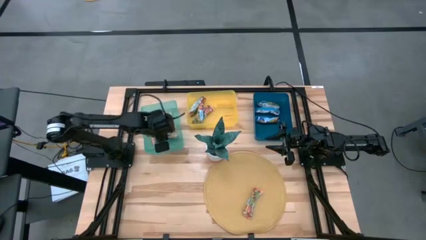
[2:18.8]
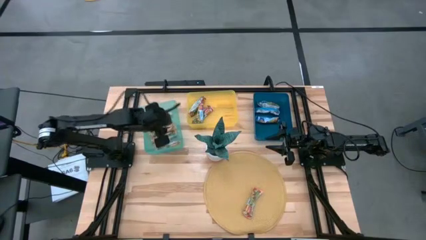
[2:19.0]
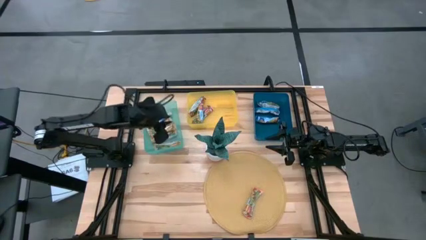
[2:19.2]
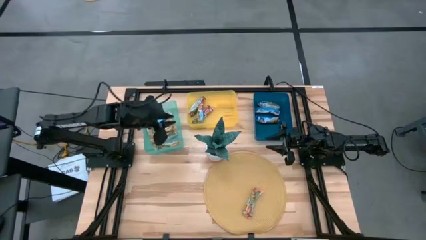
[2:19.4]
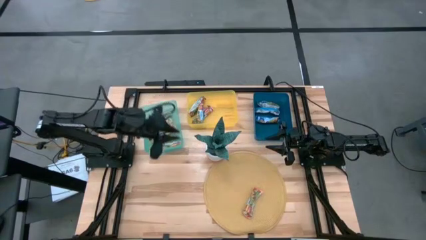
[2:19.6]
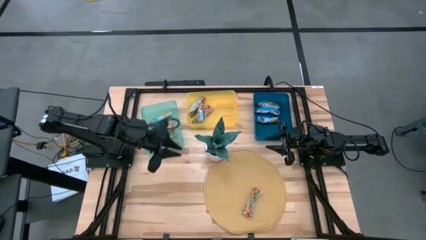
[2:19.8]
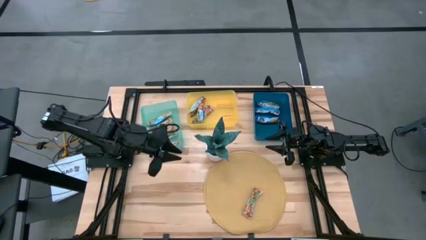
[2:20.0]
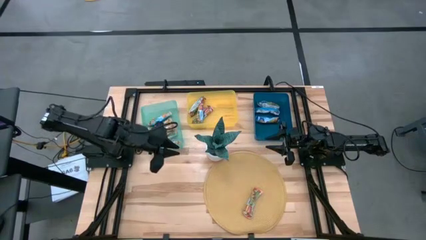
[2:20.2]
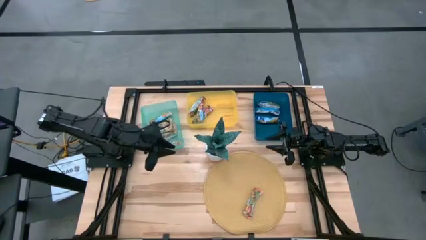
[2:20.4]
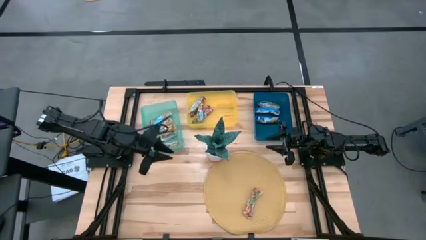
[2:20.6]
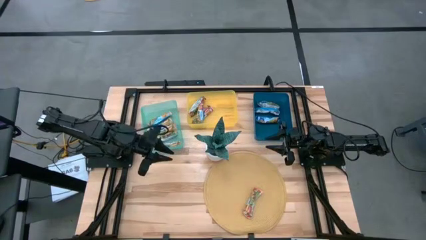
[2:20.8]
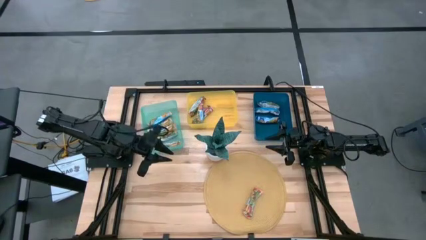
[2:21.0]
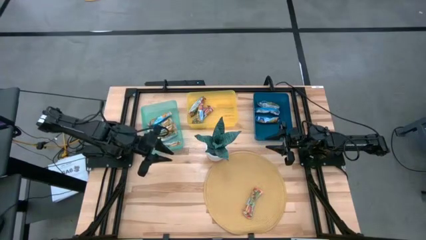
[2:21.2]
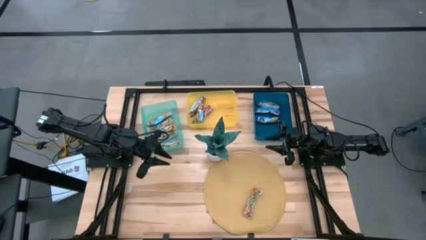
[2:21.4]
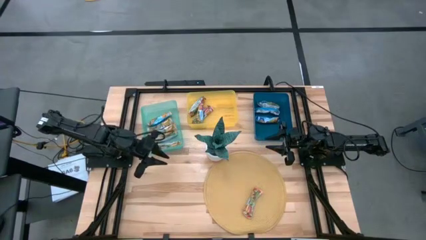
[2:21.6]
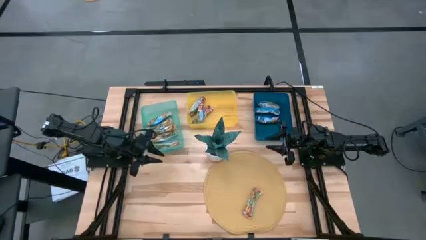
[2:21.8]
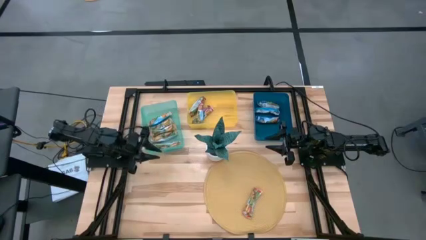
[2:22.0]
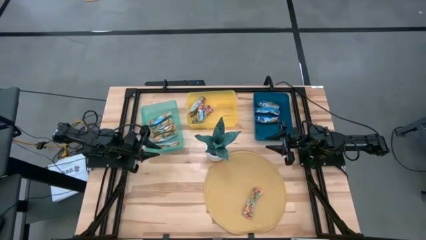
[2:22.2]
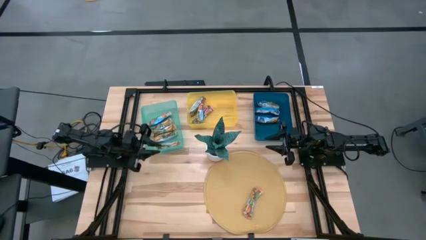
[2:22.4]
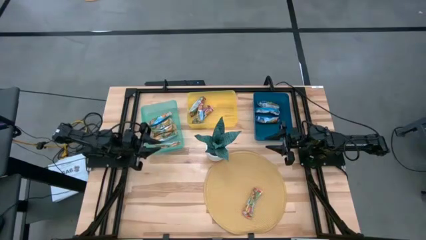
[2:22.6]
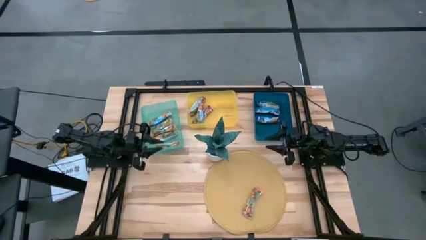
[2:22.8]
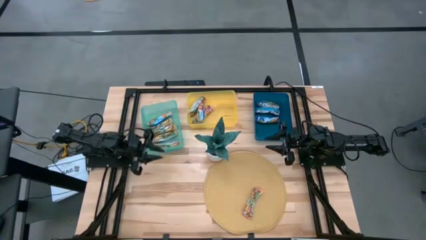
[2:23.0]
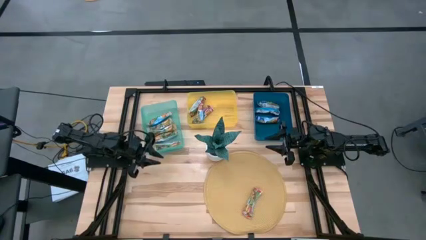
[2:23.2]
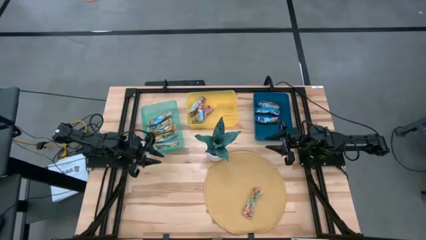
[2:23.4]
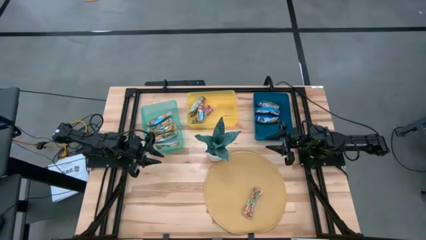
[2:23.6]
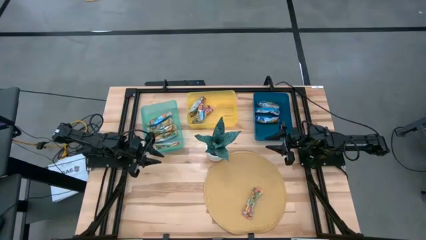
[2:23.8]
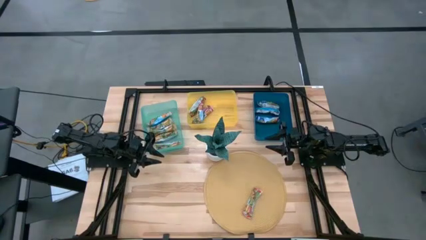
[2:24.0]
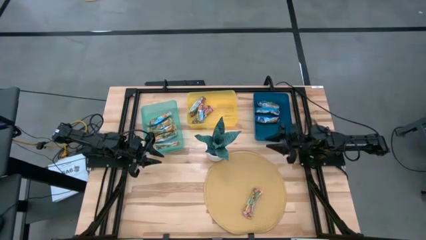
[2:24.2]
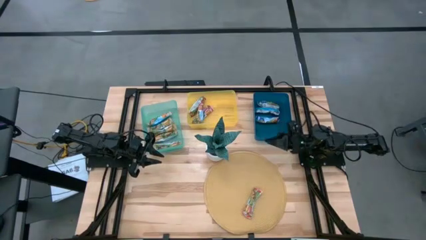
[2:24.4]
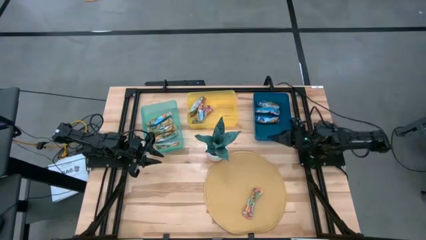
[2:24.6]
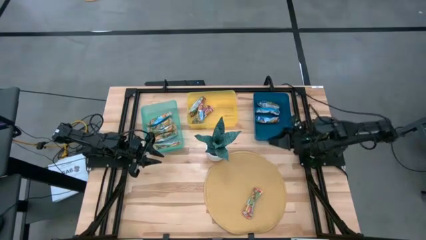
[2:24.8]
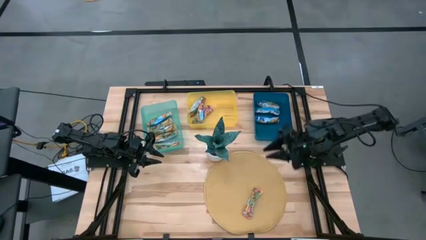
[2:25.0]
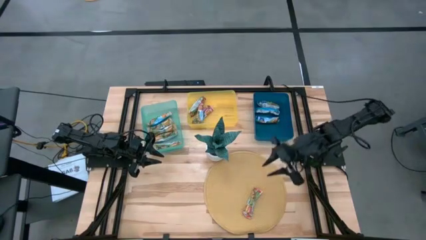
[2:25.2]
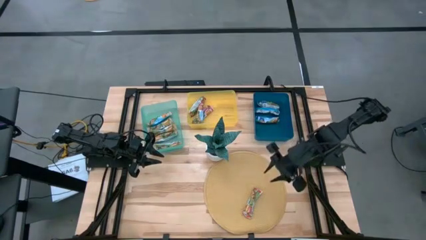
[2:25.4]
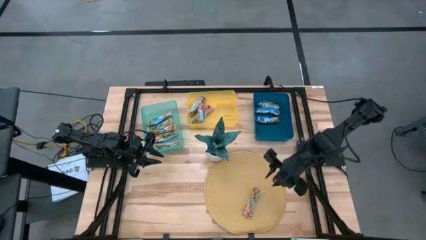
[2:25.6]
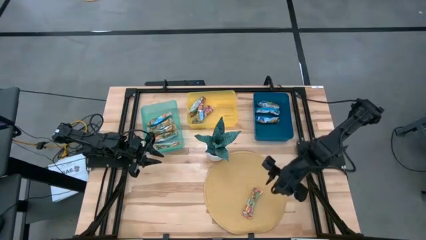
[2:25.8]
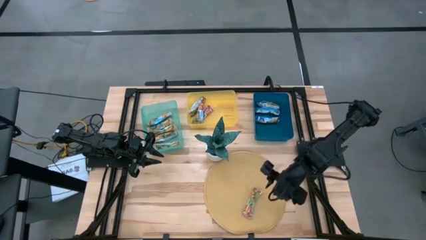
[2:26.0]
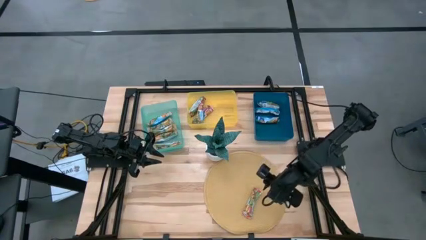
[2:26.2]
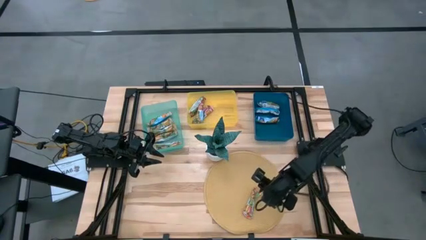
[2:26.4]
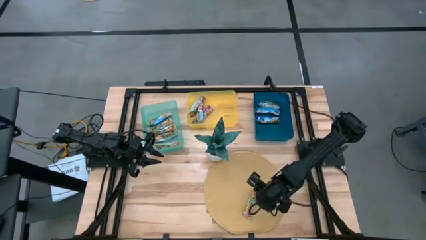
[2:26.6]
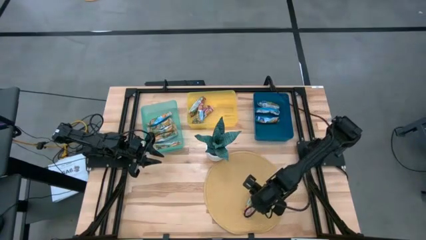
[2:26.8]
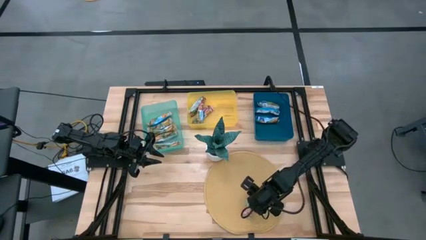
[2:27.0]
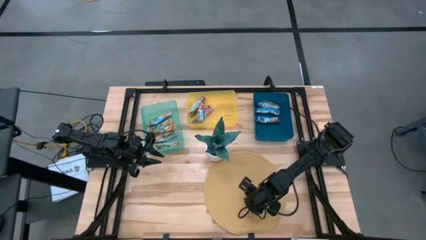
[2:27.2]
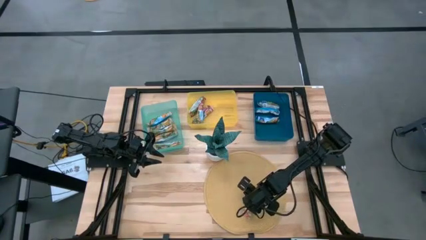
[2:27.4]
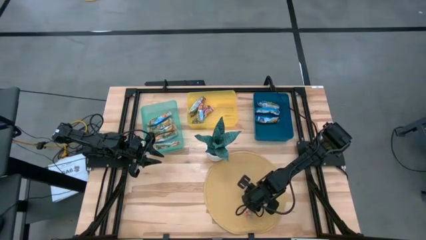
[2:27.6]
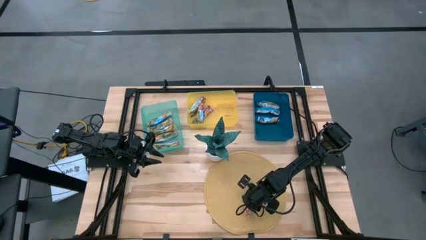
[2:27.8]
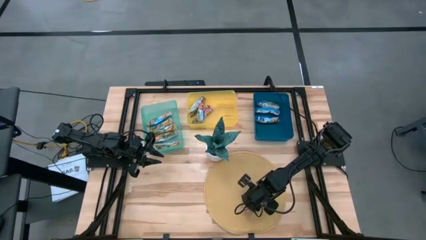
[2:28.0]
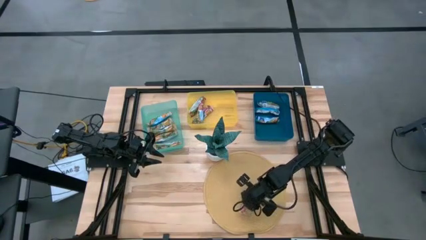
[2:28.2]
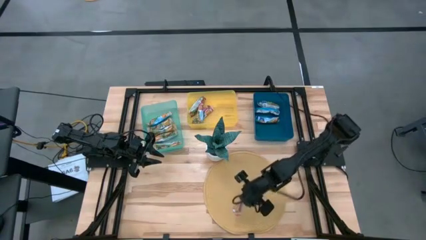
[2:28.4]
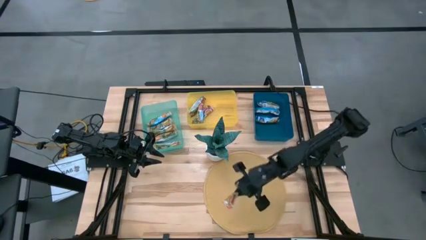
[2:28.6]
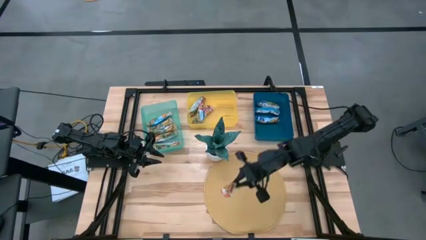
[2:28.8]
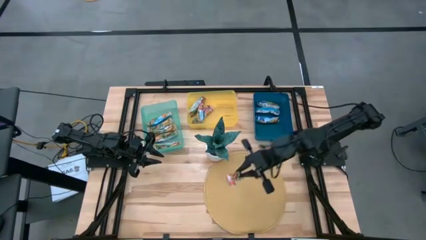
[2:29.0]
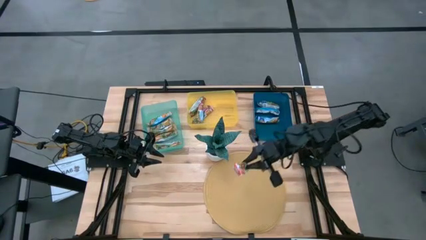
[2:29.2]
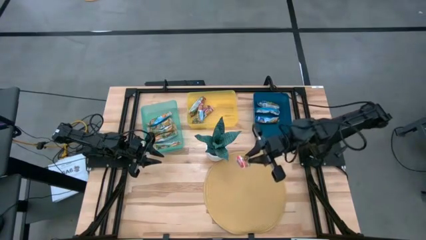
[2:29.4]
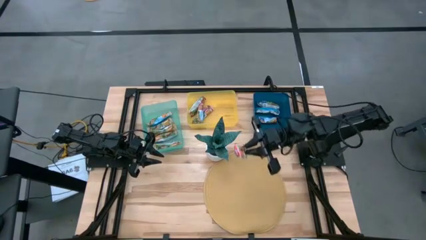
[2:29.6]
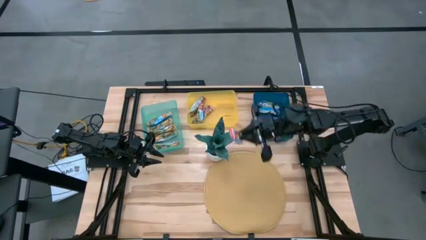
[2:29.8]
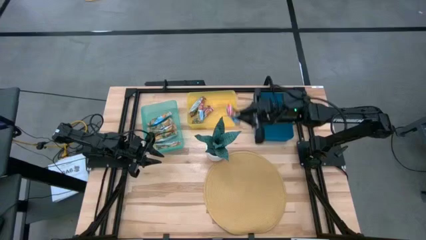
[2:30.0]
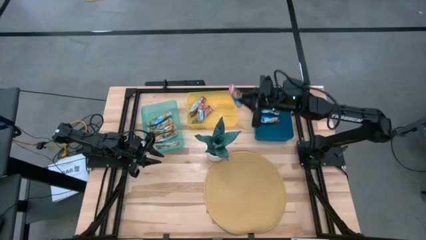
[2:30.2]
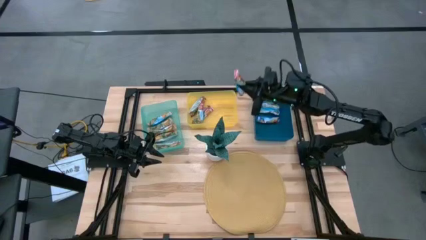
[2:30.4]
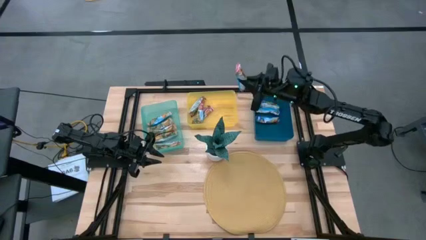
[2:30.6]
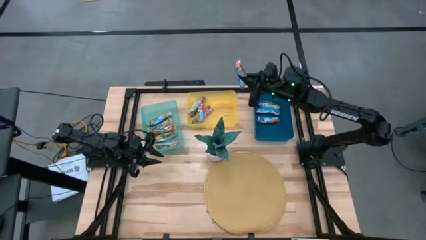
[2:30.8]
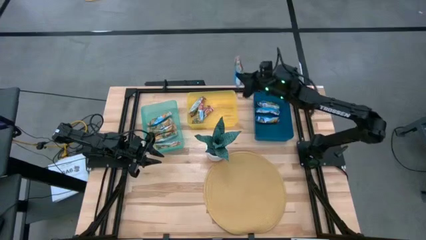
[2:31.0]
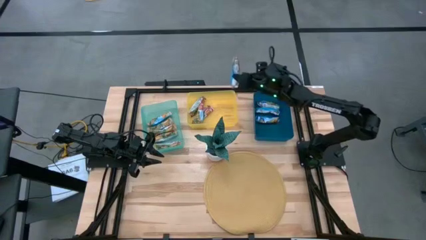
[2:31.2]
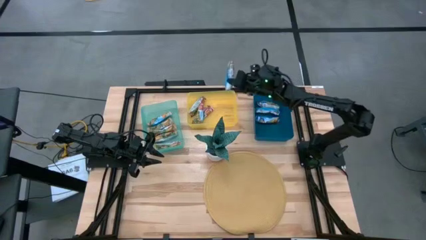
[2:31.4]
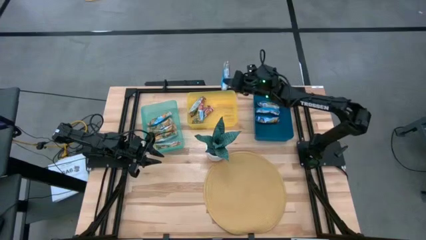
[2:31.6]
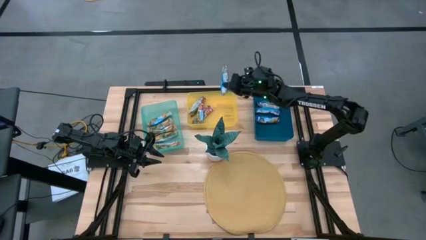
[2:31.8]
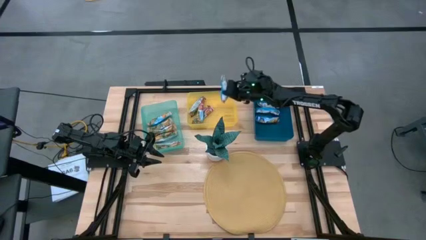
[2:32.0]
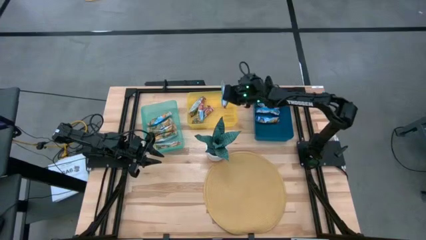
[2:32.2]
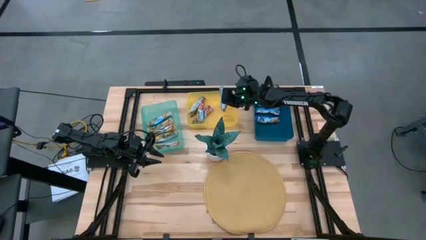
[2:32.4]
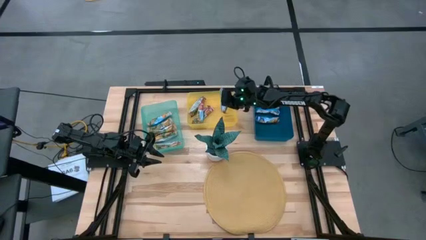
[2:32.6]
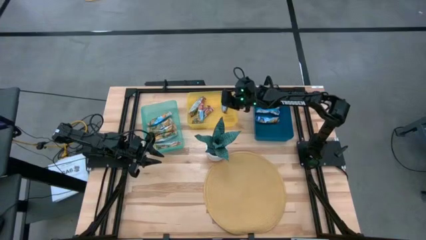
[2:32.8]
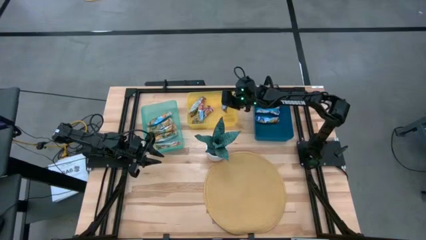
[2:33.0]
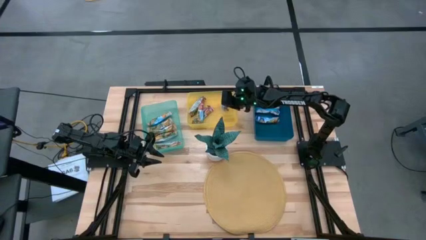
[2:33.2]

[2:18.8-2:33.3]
Task: Pick and place Granola Bars by type
Put the red granola bar into the yellow bin

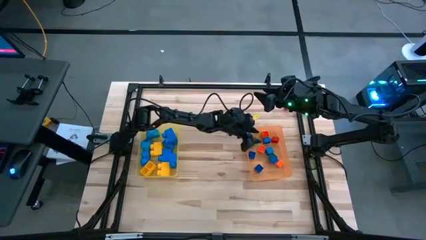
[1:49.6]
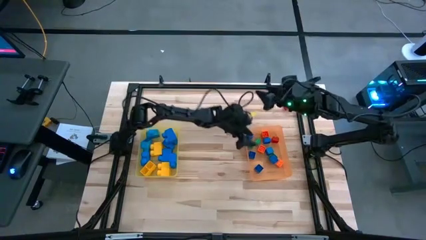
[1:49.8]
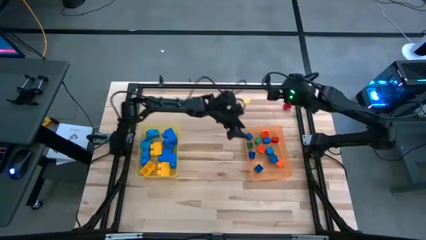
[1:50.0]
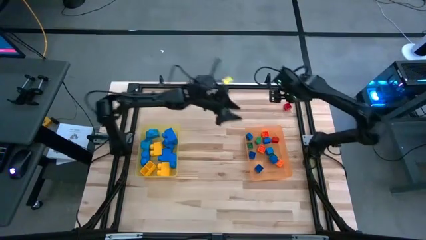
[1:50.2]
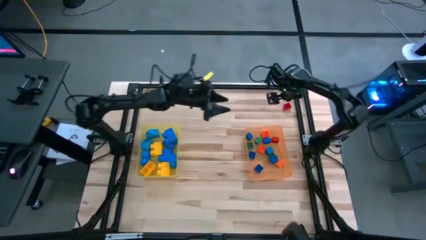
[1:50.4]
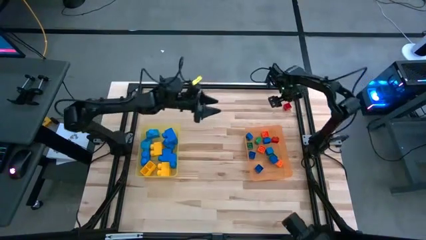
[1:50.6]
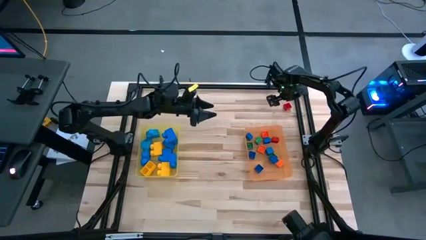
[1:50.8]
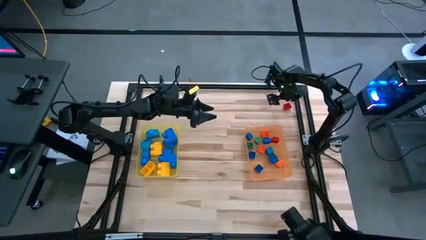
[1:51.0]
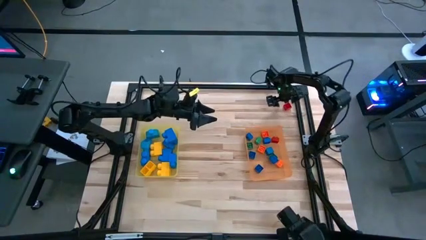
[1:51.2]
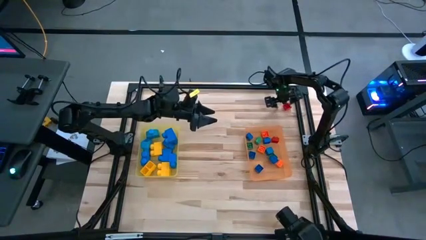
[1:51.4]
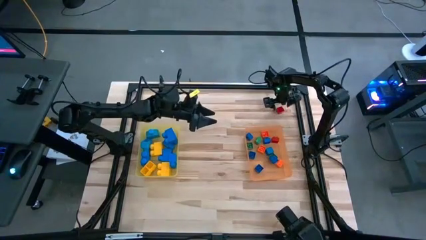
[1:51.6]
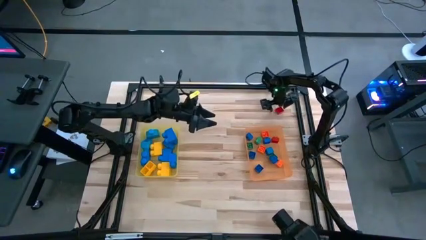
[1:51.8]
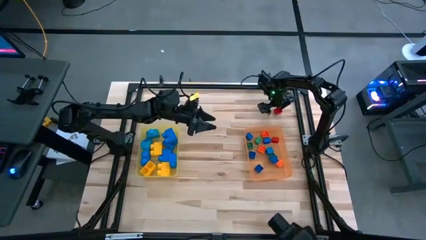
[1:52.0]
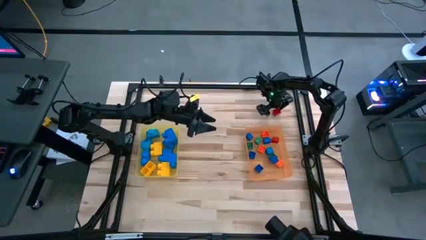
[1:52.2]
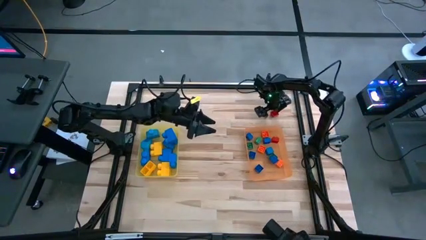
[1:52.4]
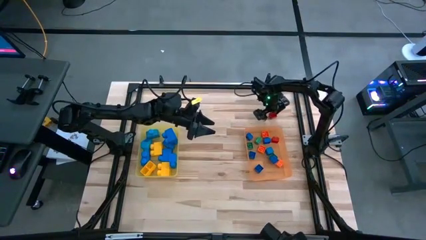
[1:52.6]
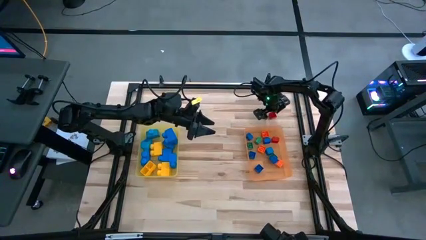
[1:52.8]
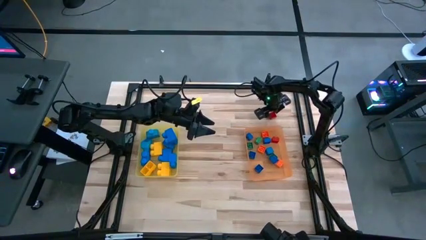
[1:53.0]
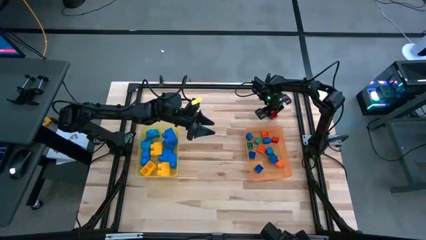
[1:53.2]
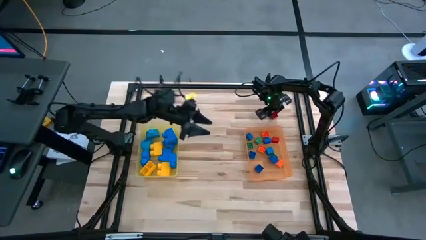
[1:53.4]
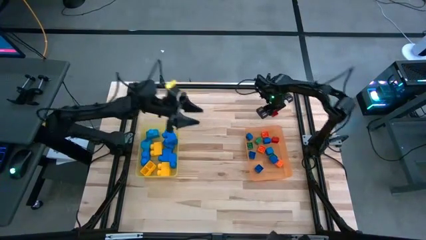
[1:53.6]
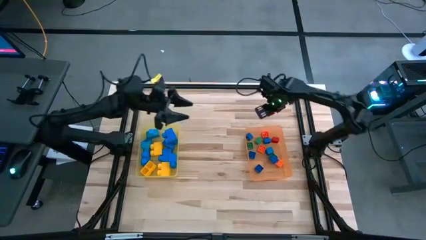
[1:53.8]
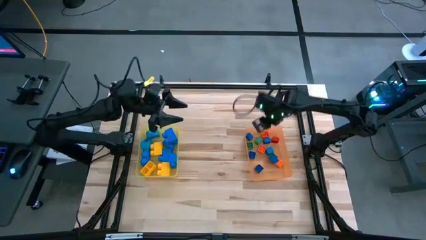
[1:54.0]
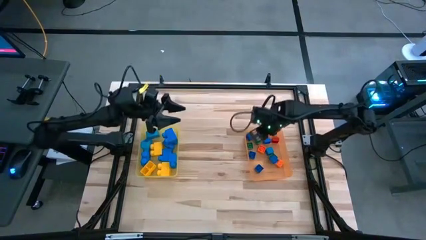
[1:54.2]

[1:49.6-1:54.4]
Task: Sort blocks by size
Put the small red game piece into the orange bin
